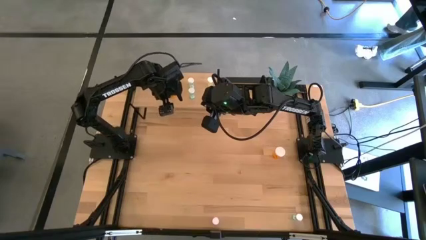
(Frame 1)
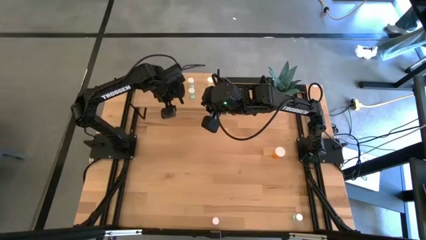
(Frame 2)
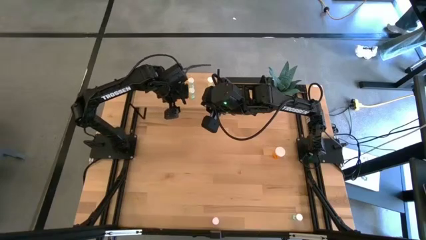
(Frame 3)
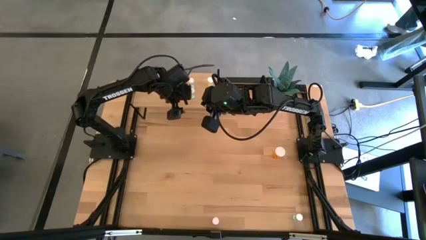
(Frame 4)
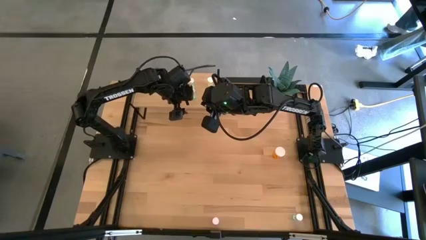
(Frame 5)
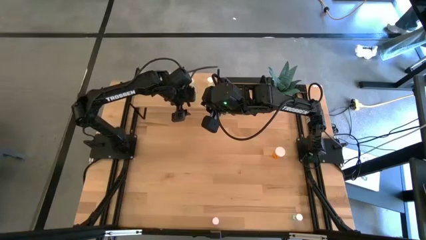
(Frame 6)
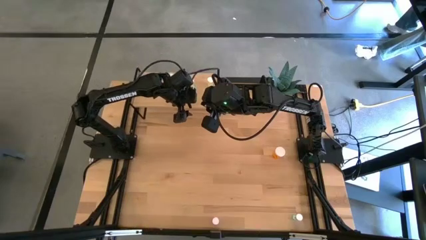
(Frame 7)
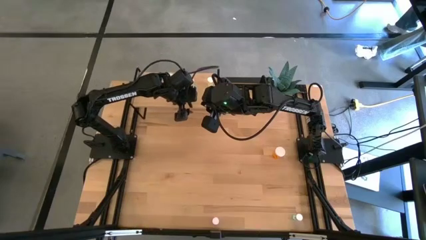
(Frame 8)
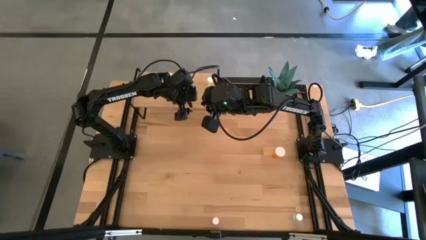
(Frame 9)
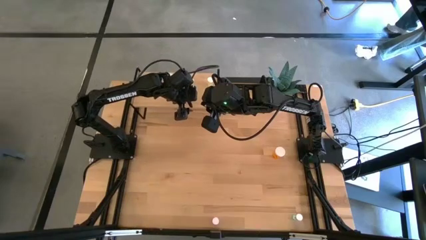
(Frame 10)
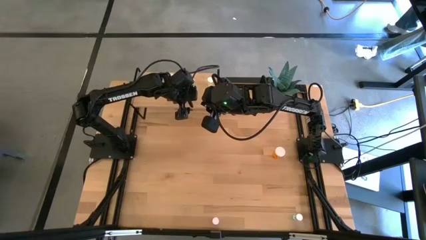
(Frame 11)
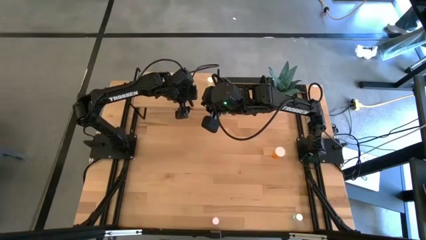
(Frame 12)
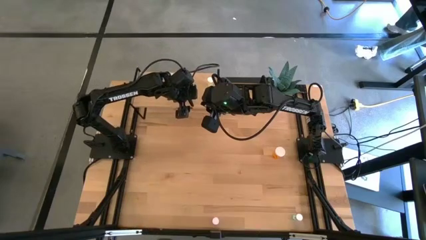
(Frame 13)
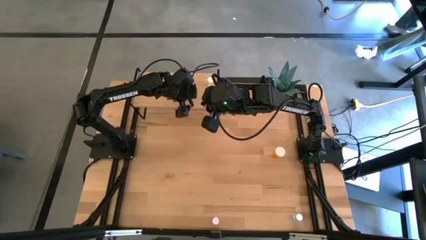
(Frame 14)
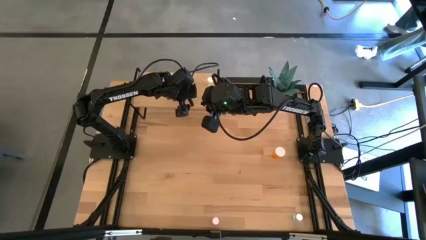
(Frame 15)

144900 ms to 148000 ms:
Task: Pick and place medicine bottles onto shelf by color
Adjust the blue pill bottle on the shelf

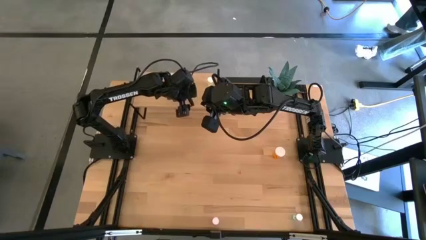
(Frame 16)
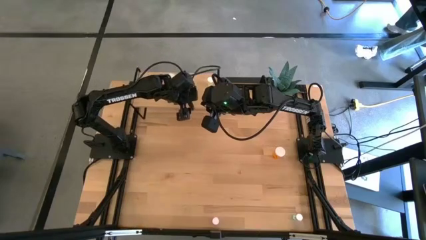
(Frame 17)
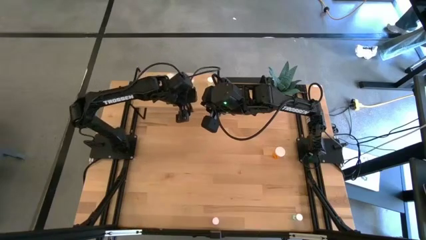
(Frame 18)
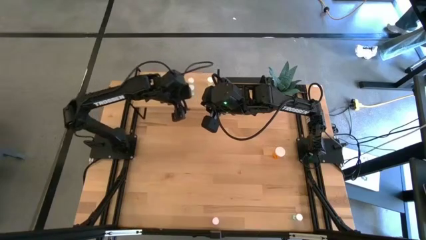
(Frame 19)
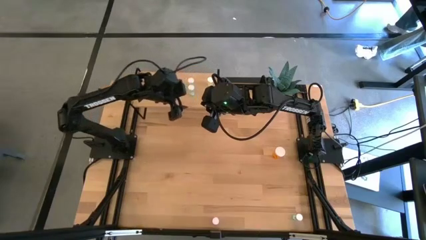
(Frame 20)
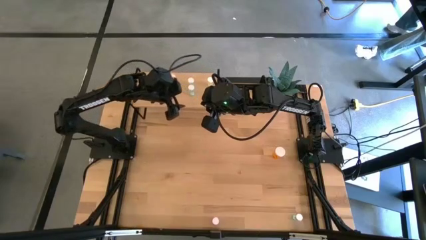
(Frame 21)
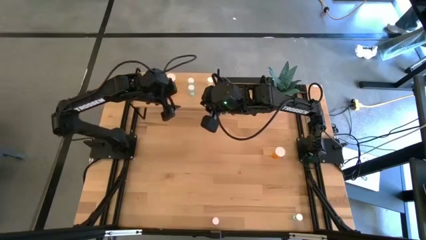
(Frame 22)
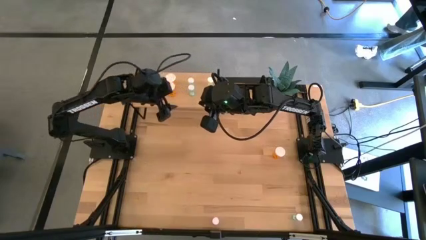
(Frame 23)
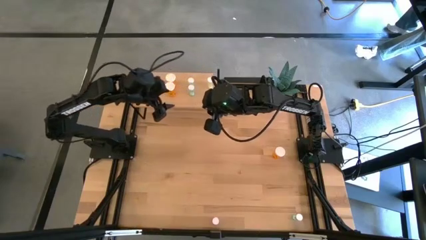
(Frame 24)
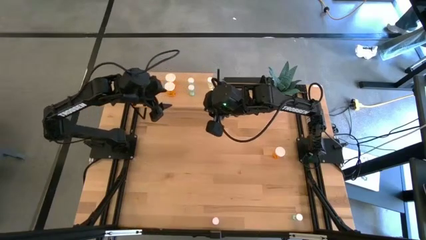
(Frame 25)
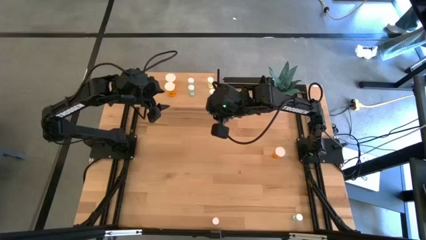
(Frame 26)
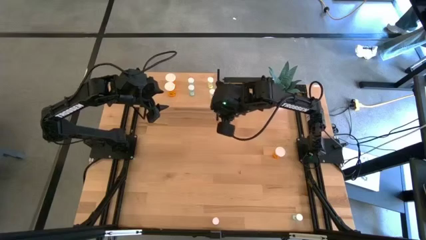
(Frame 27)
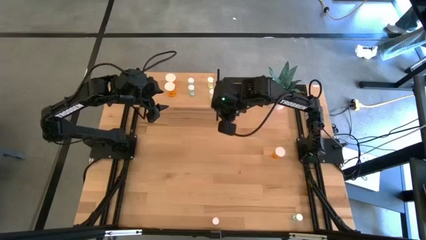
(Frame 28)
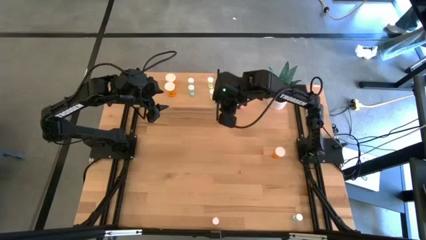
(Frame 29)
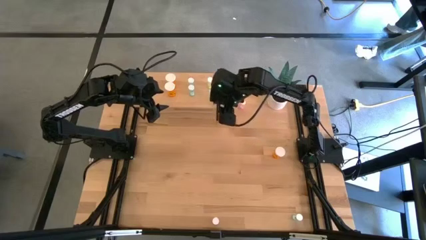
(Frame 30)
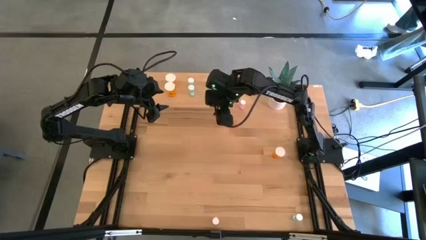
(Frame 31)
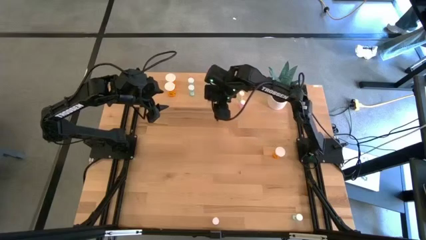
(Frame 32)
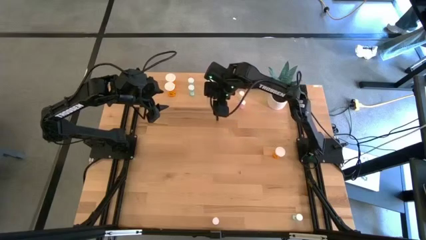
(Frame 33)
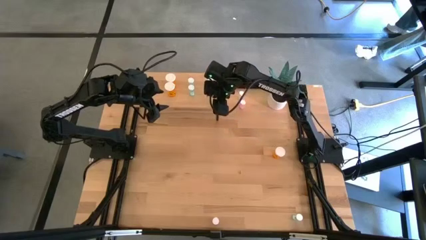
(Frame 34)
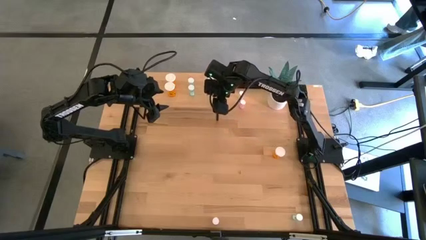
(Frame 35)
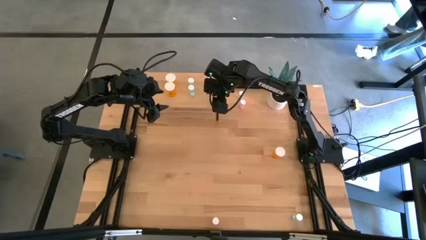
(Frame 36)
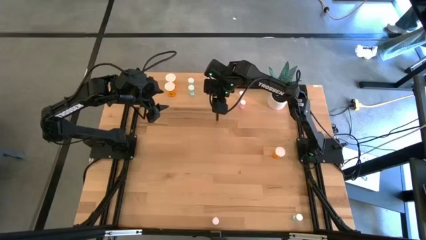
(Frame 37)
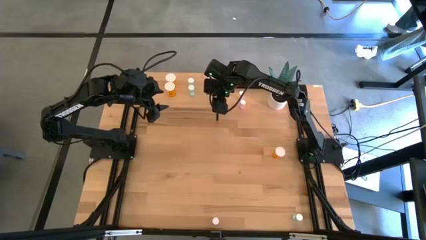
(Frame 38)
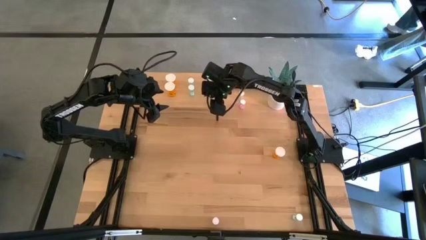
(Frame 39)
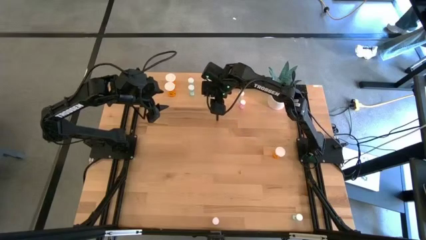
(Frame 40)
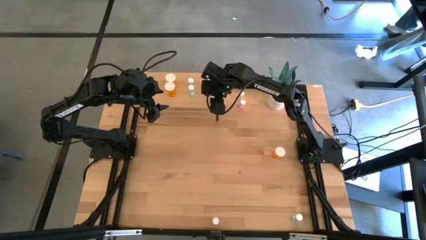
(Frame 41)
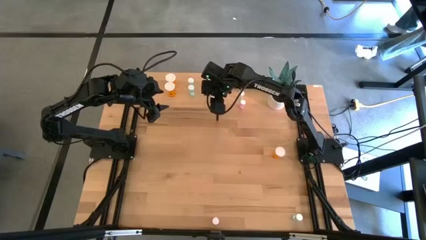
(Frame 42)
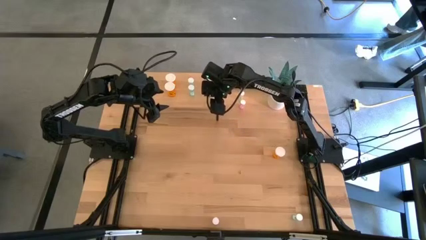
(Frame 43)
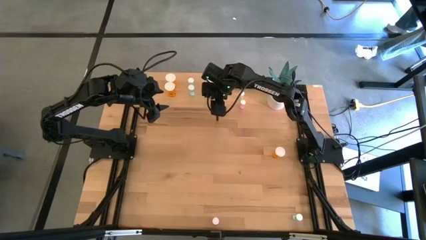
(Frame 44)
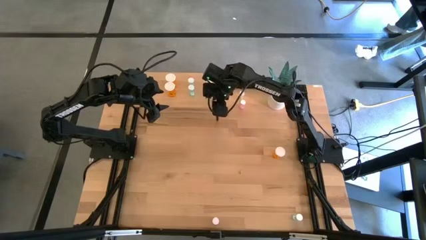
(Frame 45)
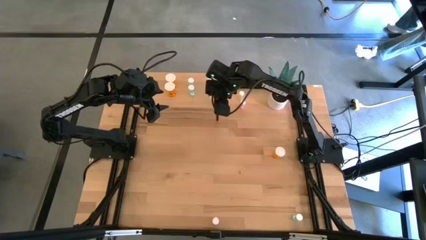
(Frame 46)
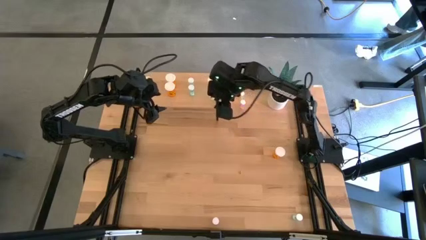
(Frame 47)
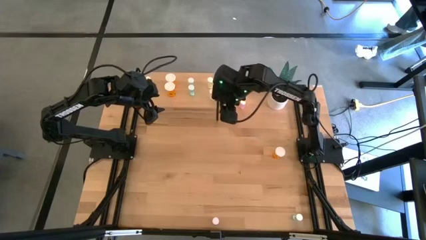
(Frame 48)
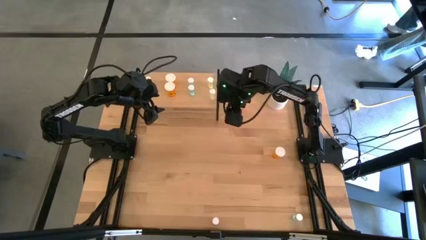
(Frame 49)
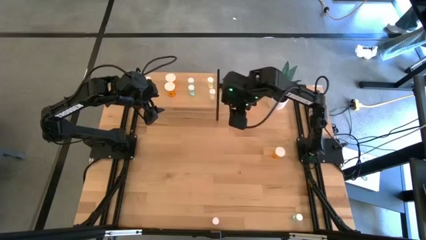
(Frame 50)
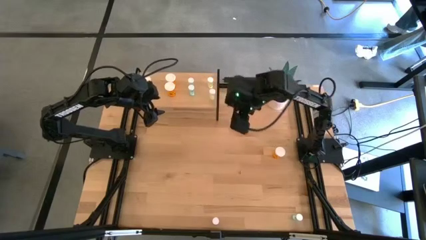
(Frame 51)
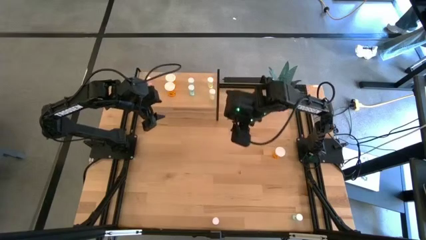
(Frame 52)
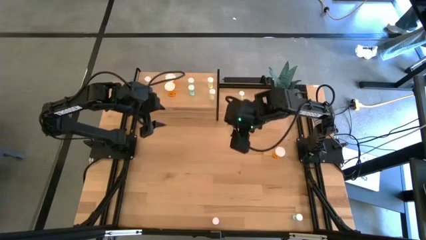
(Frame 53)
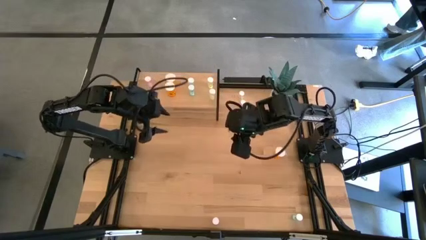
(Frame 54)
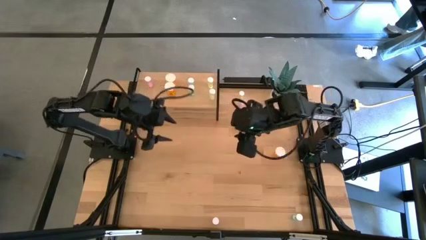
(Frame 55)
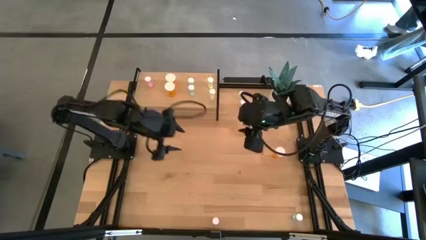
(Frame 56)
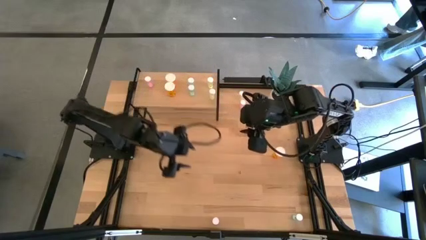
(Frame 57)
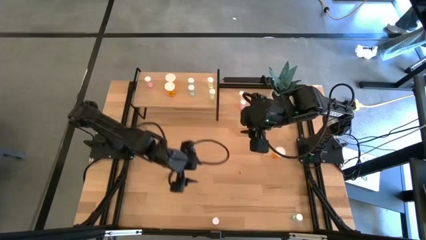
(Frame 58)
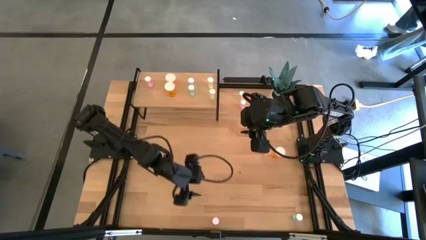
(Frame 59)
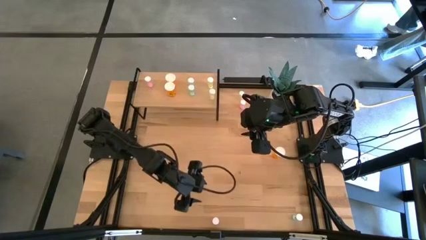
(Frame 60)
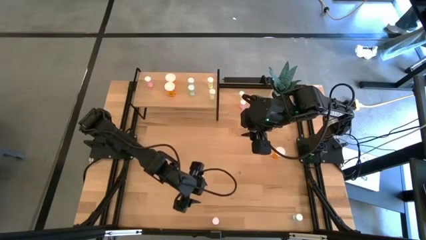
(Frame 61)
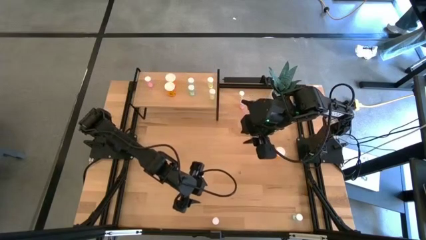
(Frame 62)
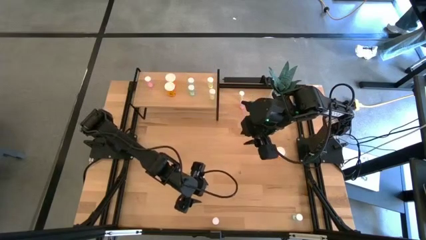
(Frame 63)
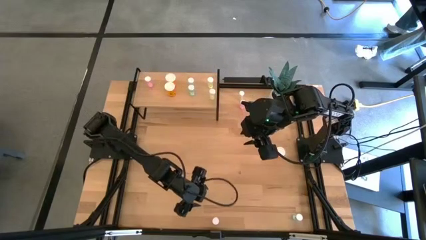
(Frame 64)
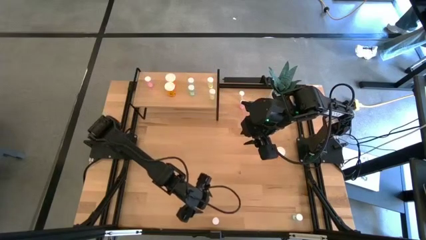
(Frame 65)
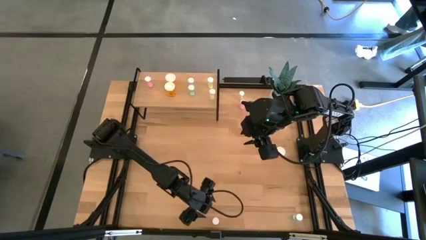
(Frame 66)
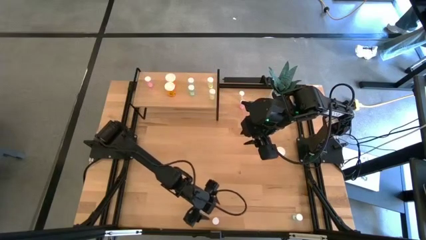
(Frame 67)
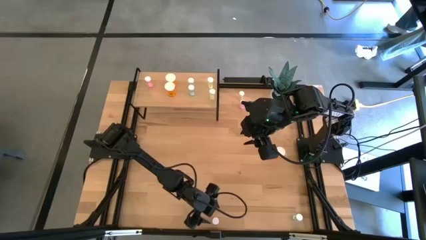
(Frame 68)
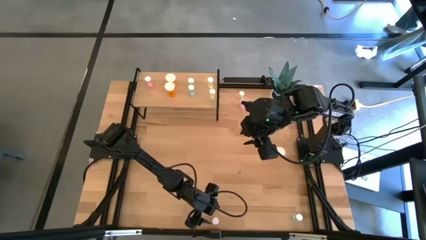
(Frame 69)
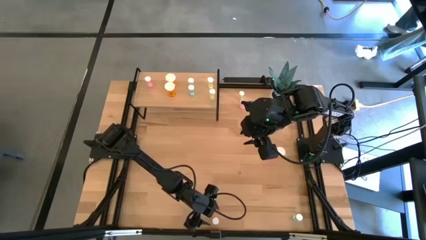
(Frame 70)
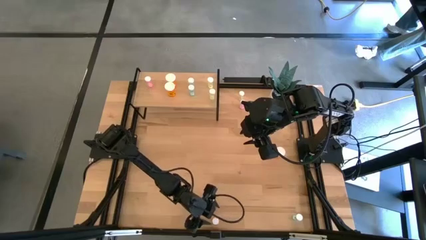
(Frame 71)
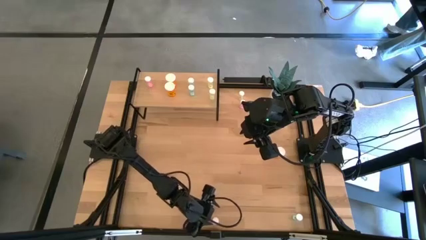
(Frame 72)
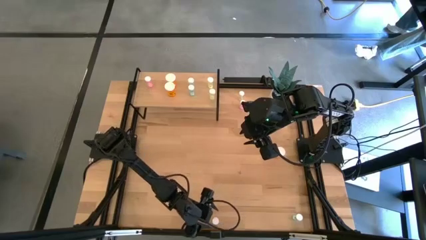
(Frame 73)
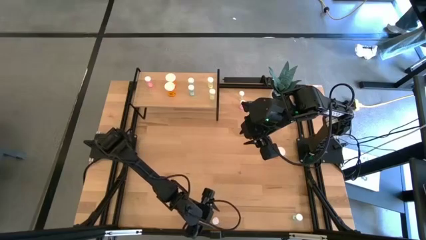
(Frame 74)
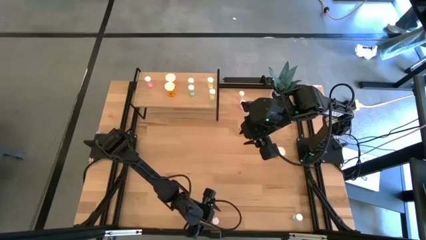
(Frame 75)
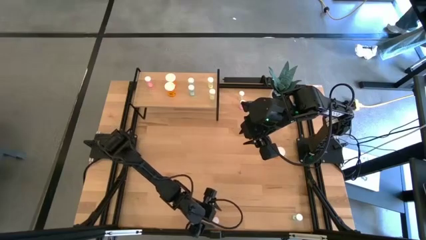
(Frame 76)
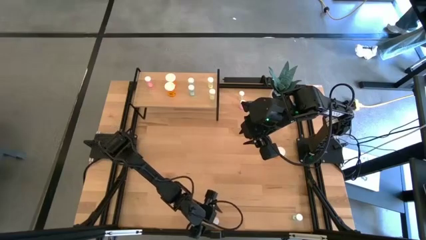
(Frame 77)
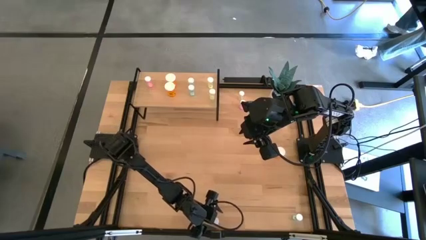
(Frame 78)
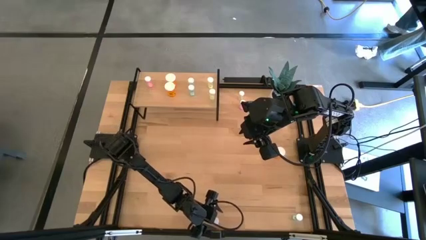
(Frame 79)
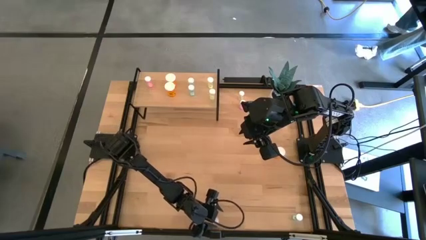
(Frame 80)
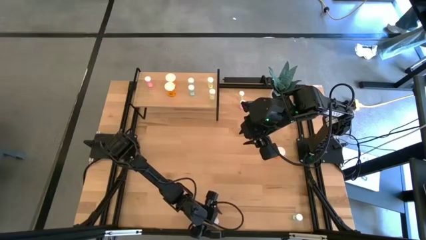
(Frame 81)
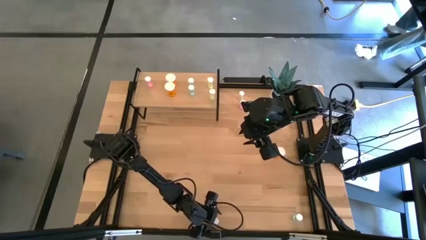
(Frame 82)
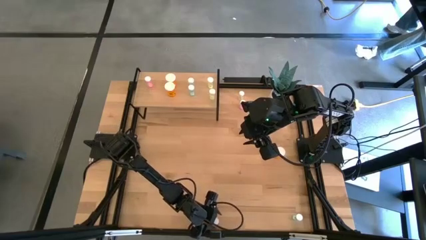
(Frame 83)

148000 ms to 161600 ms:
Put the bottom pink pill bottle on the shelf aligned with the other pink pill bottle
